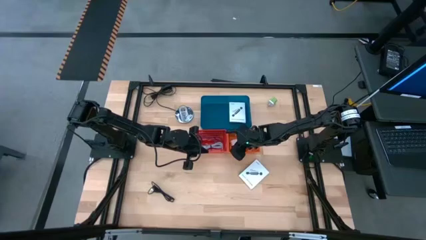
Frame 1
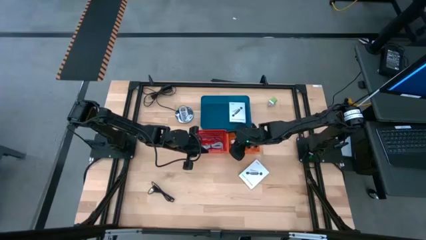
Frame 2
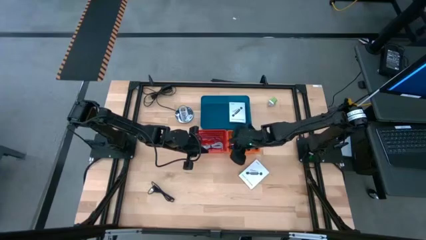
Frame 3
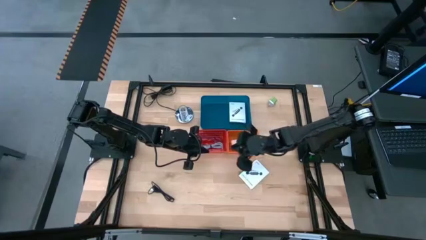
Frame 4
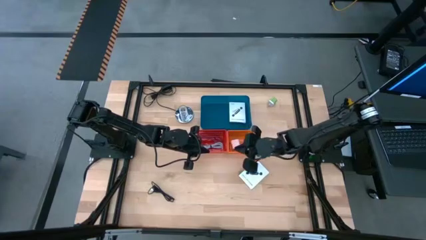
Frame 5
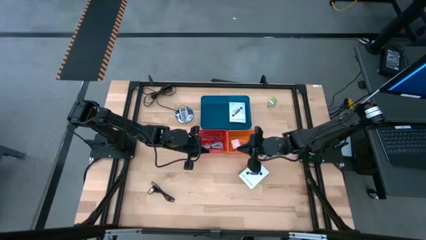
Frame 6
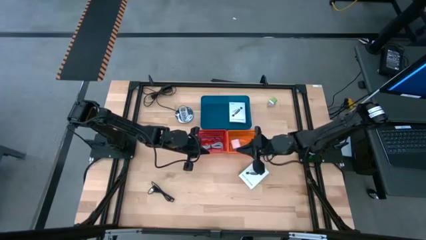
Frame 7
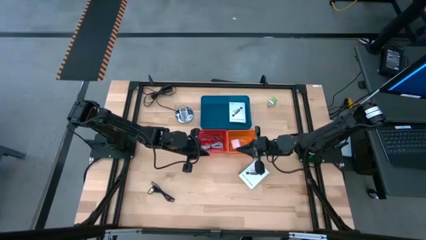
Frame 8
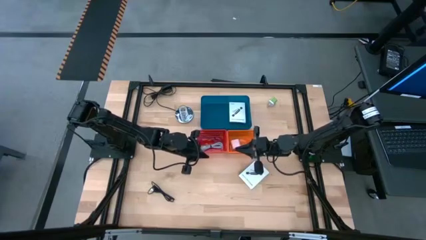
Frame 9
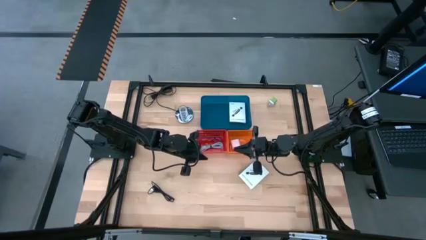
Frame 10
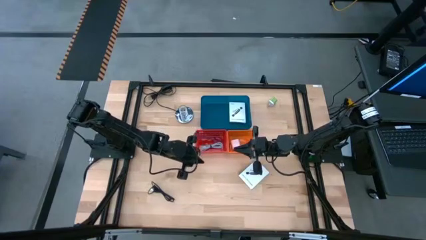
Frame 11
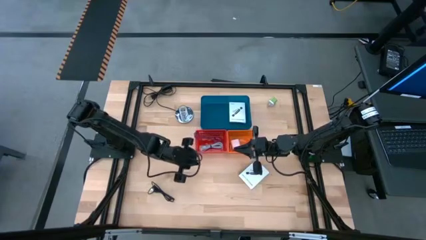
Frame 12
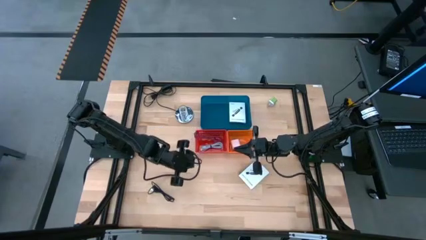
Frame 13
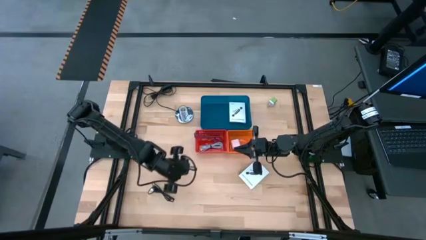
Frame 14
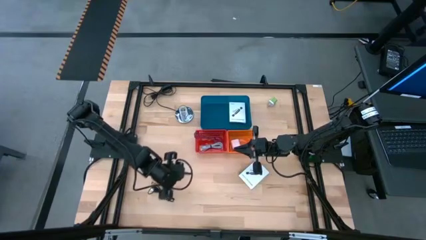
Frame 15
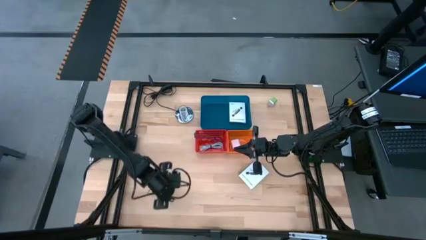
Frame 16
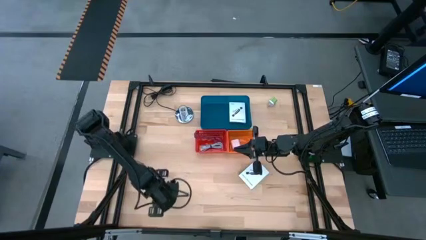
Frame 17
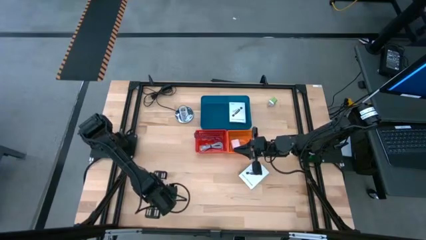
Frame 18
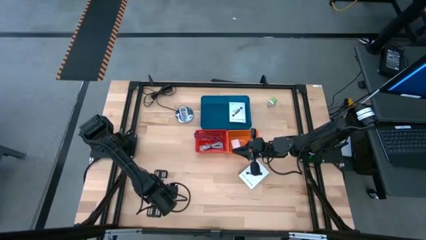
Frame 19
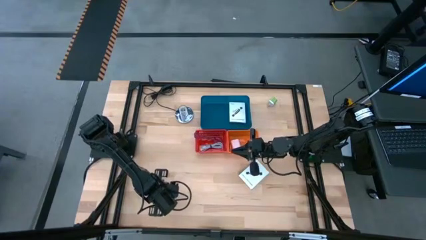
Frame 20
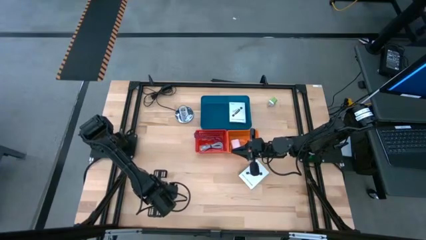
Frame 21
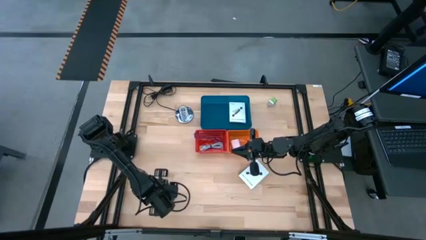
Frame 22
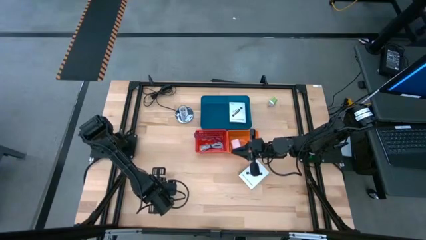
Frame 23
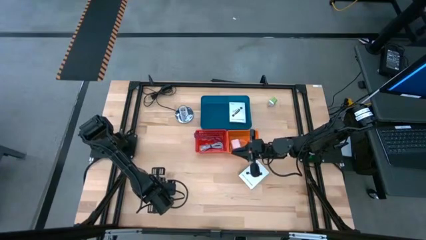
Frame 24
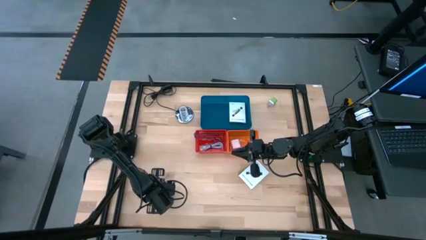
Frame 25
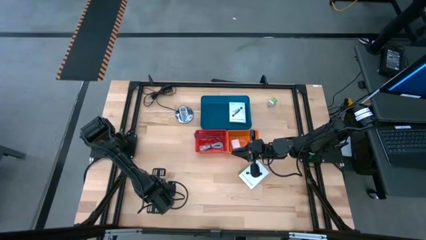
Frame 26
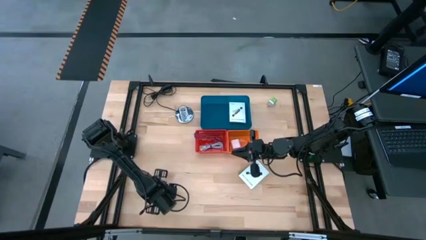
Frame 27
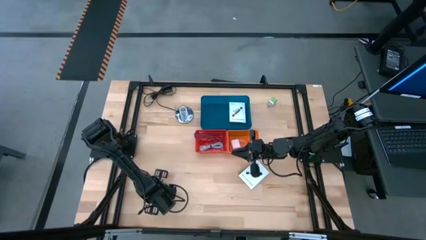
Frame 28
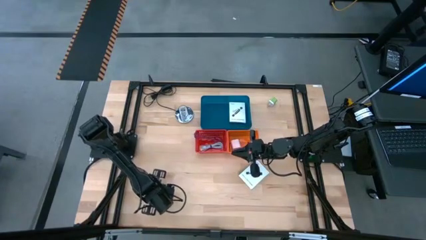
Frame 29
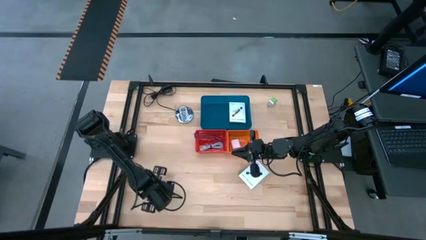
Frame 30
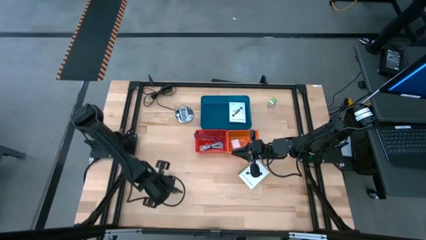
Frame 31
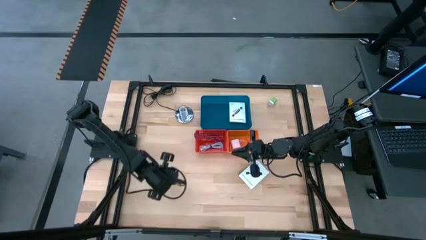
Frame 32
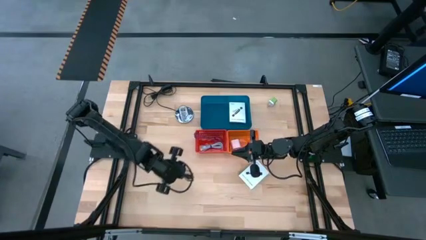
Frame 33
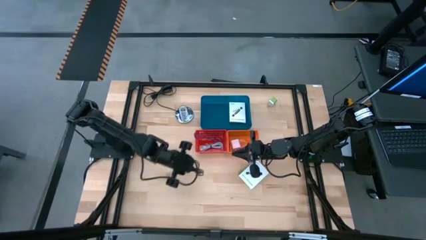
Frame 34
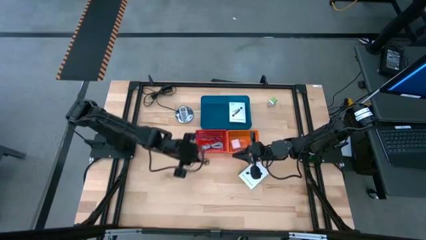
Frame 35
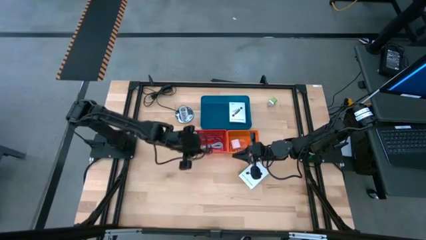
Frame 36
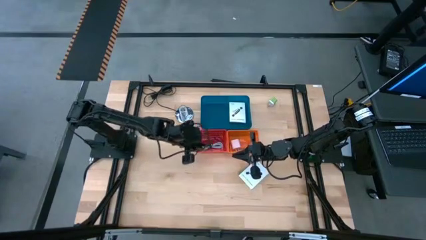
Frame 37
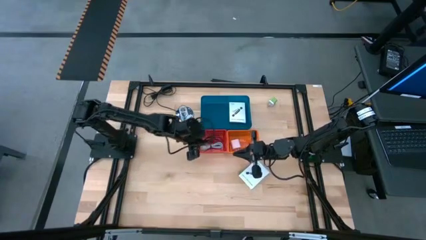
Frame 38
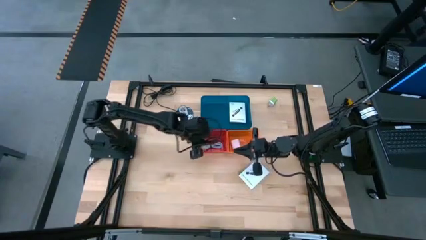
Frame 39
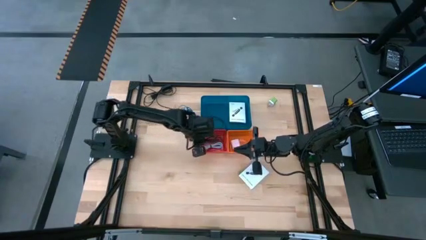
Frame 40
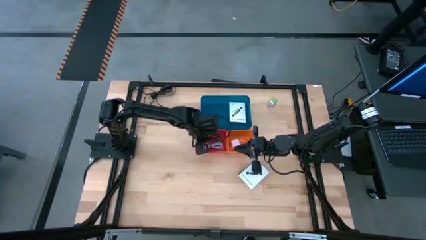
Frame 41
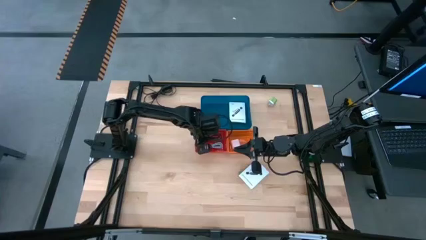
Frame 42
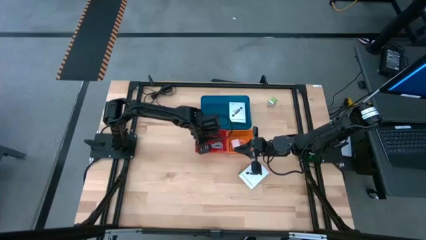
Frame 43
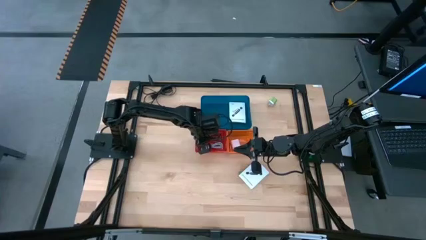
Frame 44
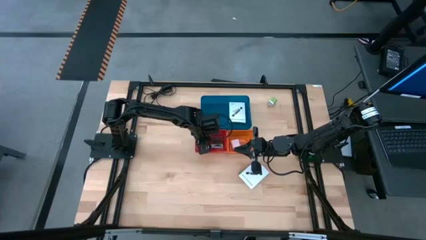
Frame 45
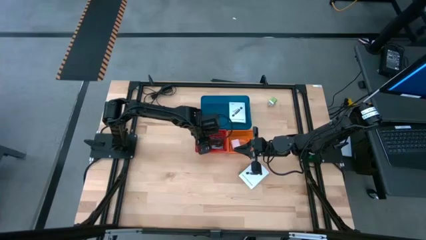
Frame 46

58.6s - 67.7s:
Task: Pick and place items into bin
Put the black charger cable into the red bin

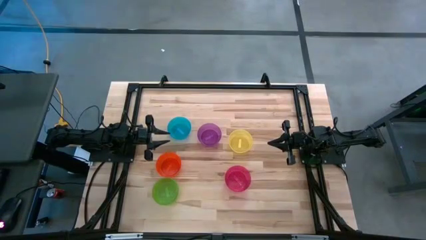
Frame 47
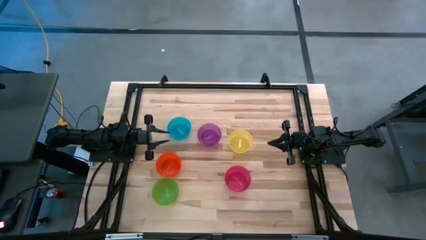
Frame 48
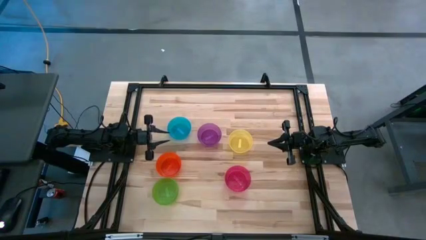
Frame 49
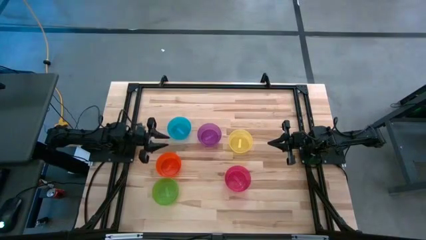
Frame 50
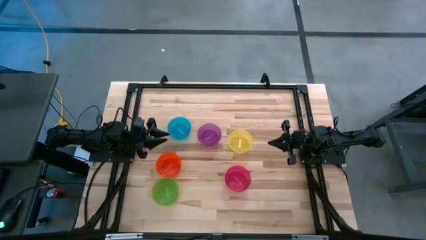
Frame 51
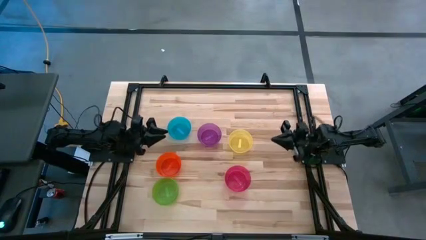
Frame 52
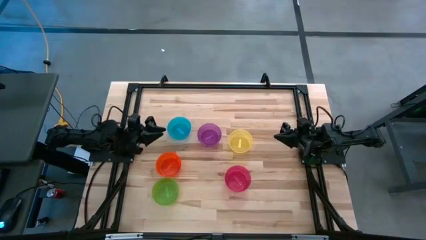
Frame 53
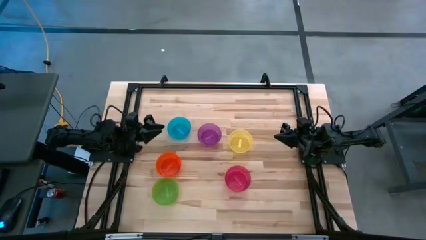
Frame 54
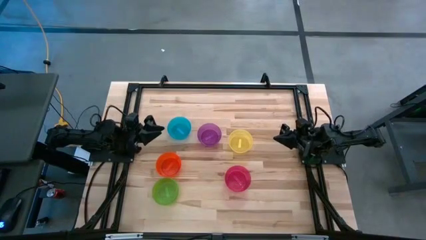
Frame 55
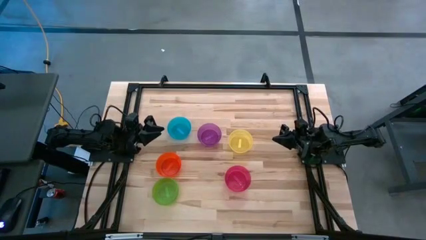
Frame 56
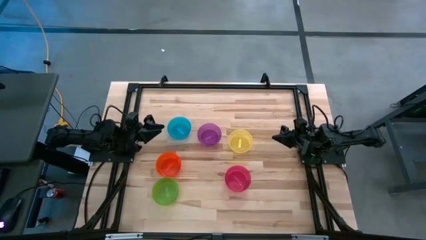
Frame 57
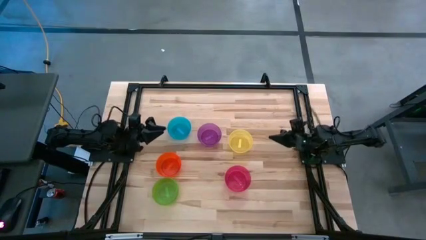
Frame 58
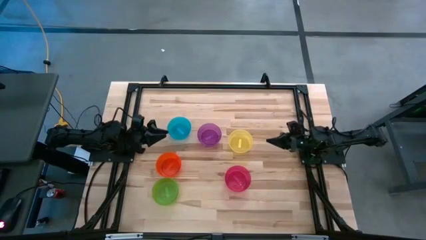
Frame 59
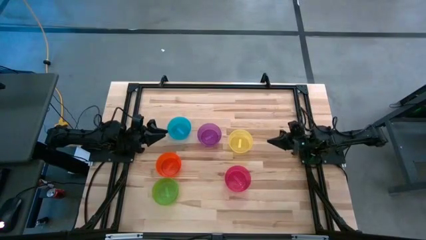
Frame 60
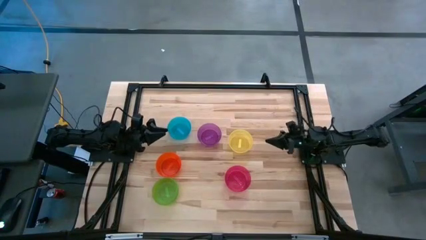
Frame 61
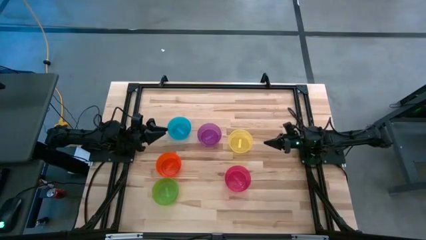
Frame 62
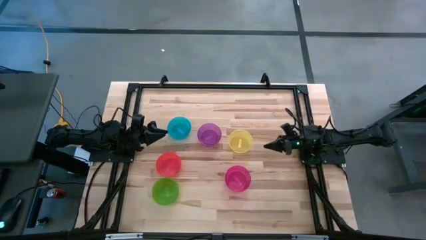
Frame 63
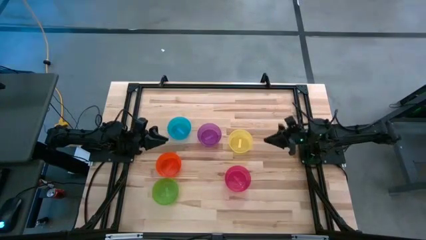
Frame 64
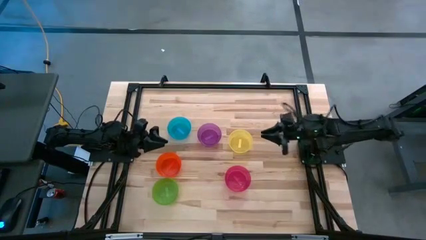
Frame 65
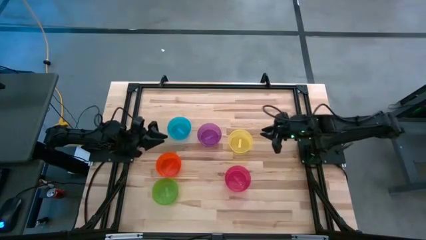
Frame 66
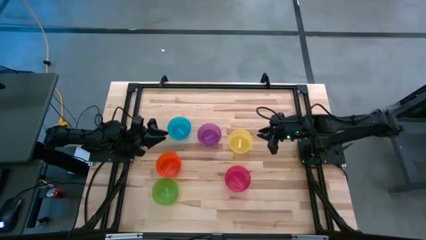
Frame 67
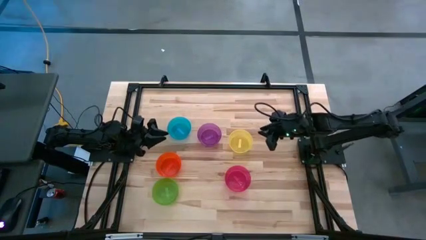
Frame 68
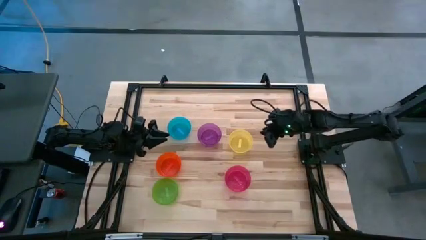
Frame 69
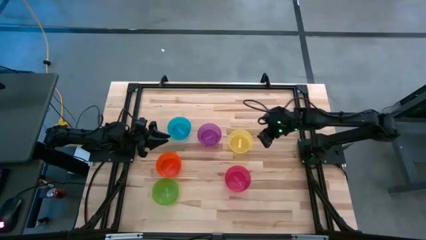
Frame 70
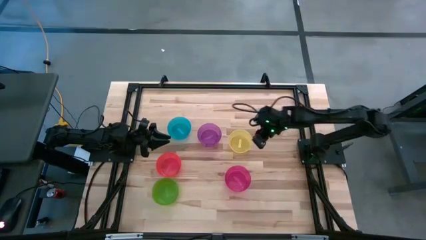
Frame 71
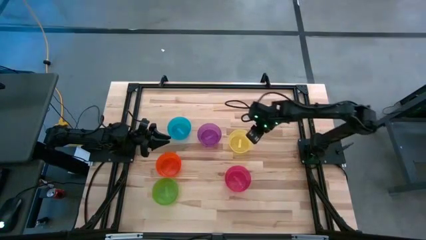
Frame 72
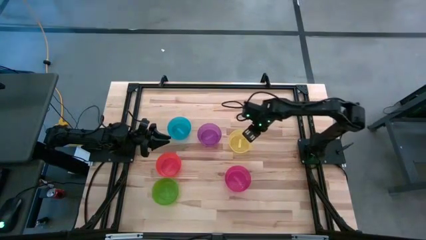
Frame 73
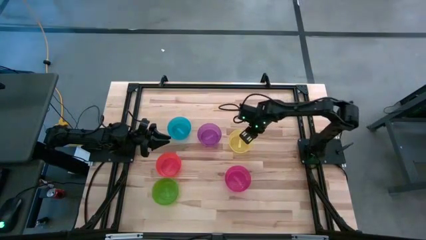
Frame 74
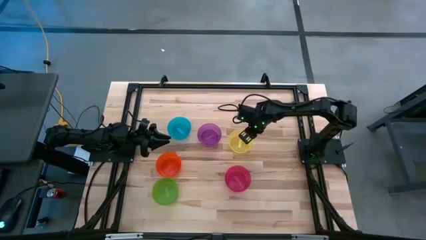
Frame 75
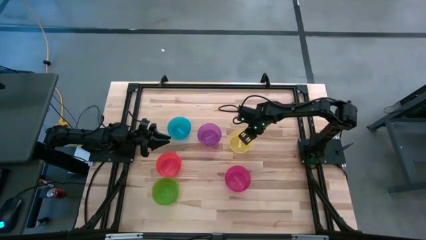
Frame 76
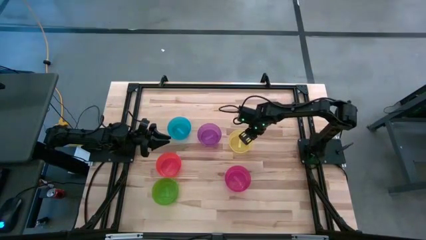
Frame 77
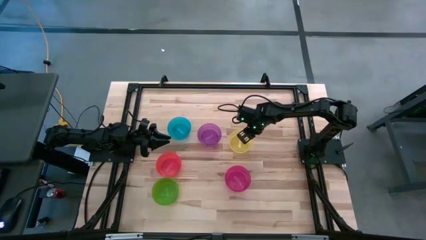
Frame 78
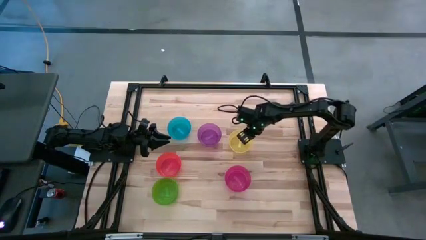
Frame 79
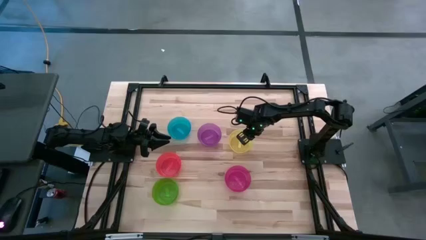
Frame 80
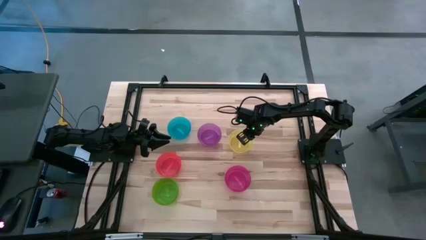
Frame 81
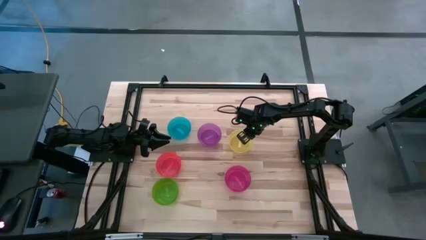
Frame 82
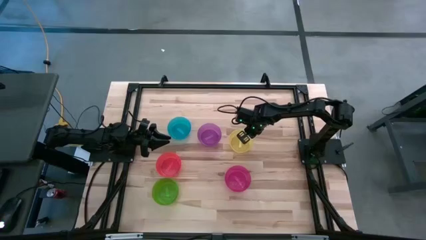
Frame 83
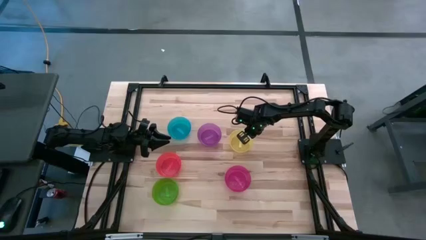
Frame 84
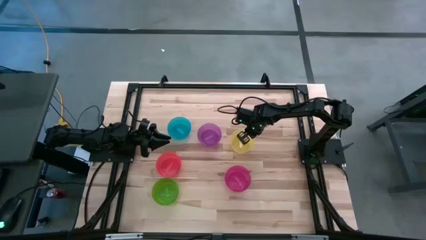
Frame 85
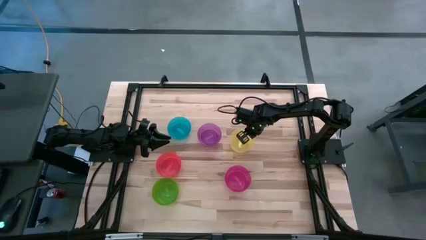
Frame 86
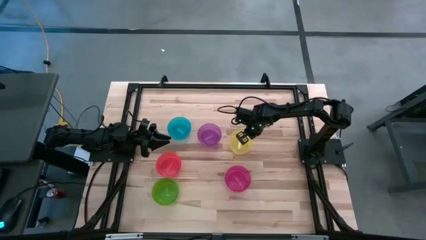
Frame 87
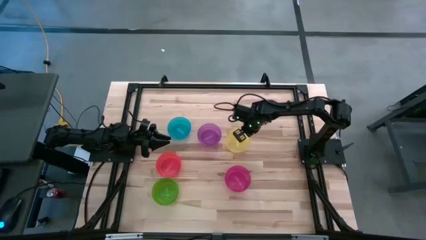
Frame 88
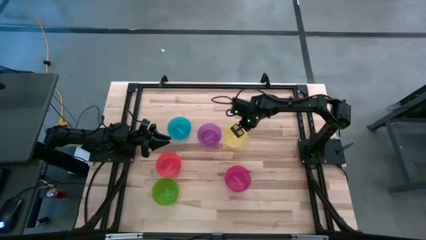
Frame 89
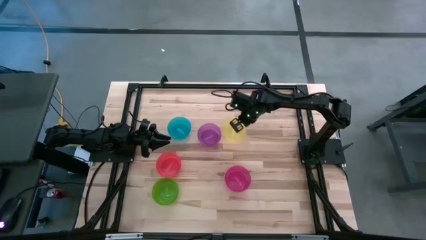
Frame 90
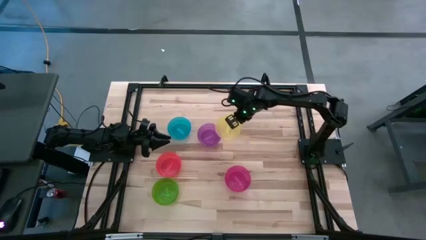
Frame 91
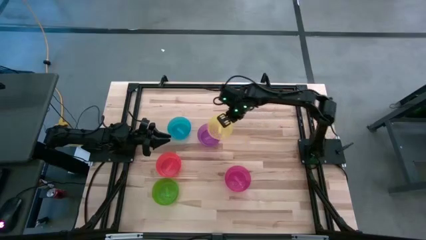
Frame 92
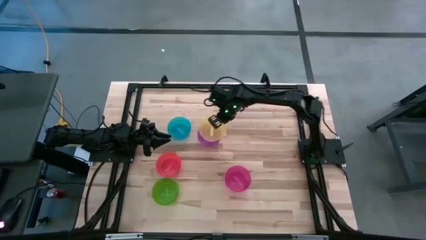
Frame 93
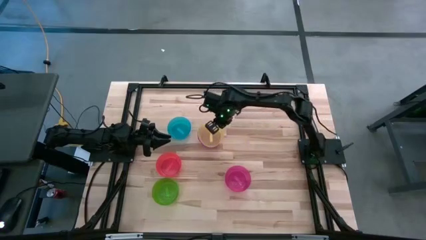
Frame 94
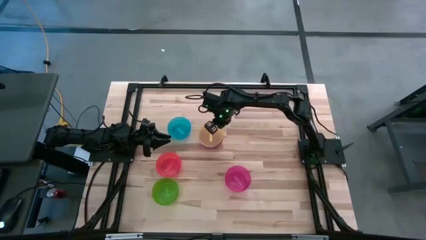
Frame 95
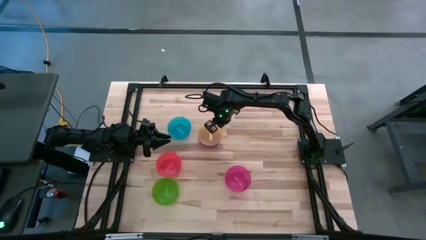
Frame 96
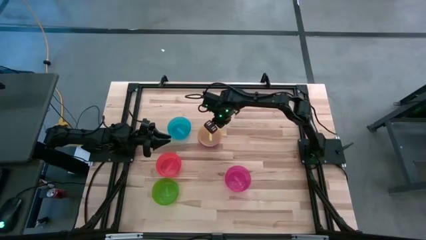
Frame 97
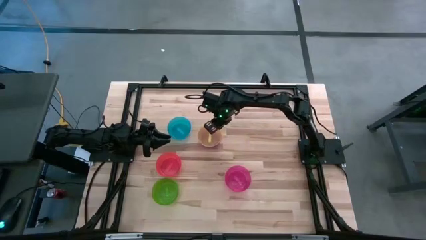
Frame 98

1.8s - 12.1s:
Task: Nest bowls inside each other
Stack the yellow bowl on top of the purple bowl
